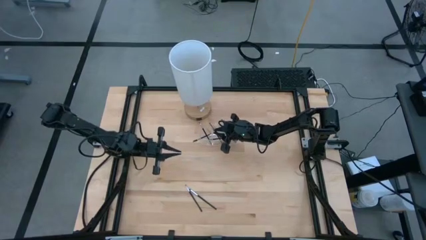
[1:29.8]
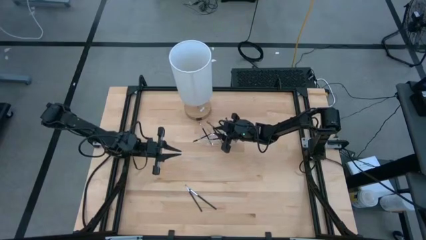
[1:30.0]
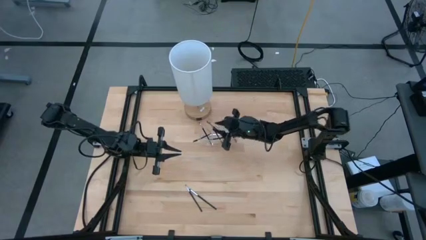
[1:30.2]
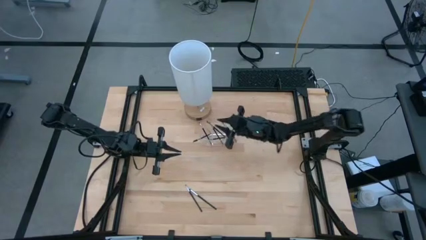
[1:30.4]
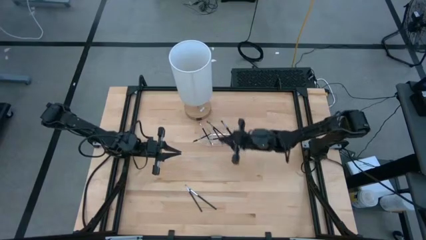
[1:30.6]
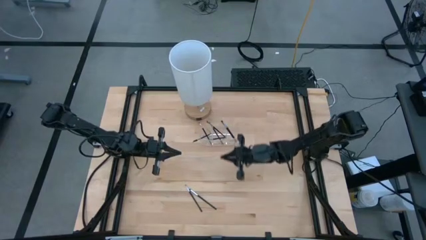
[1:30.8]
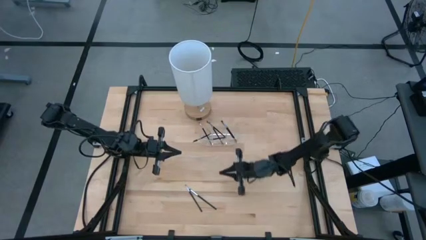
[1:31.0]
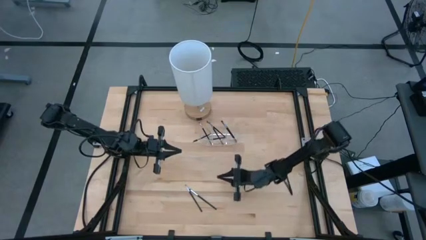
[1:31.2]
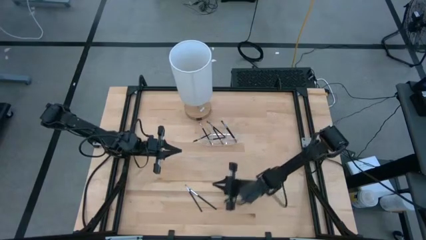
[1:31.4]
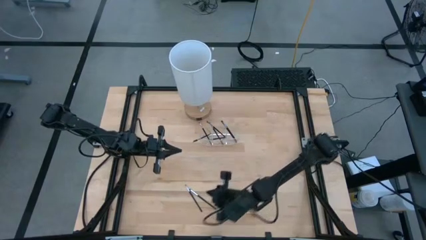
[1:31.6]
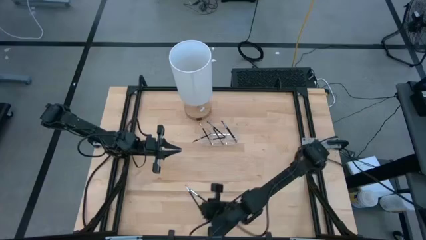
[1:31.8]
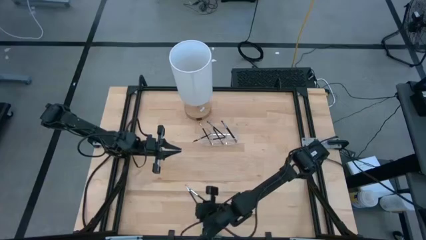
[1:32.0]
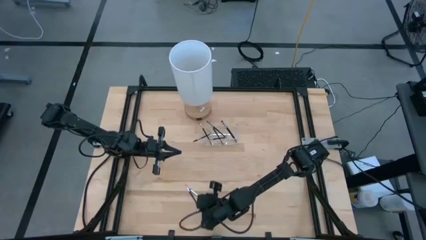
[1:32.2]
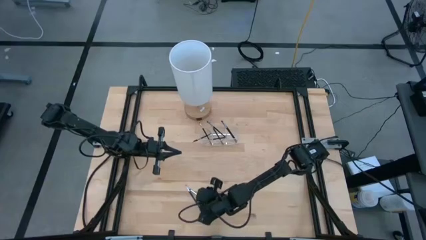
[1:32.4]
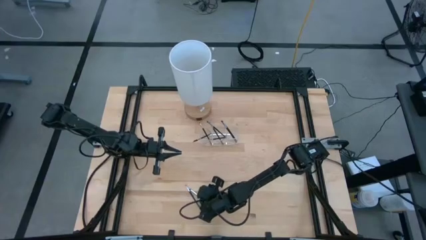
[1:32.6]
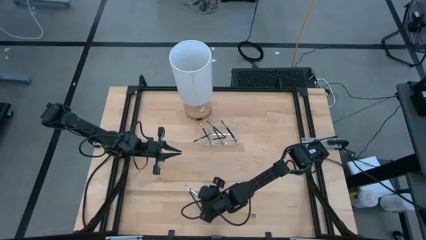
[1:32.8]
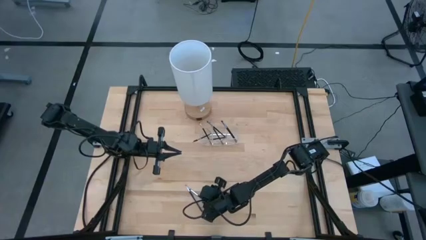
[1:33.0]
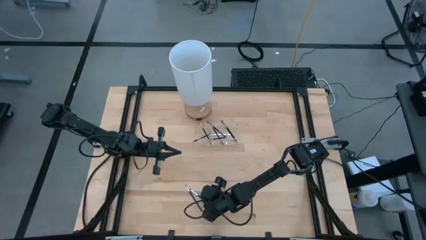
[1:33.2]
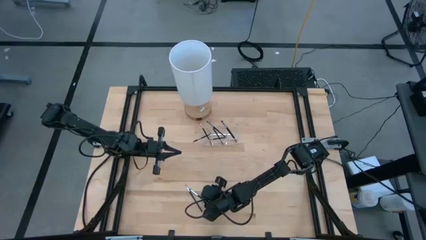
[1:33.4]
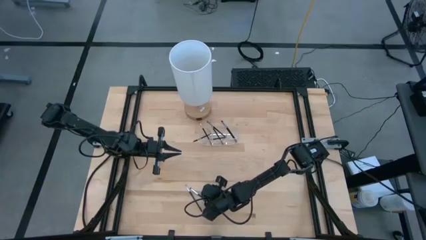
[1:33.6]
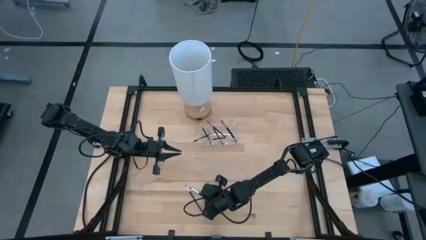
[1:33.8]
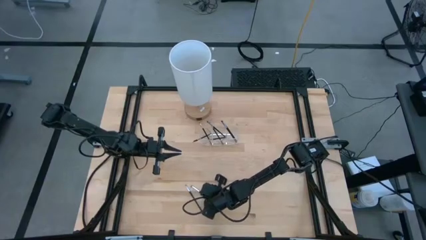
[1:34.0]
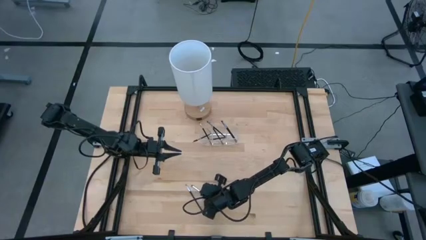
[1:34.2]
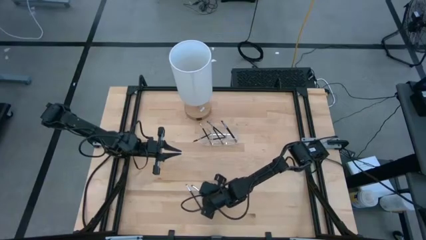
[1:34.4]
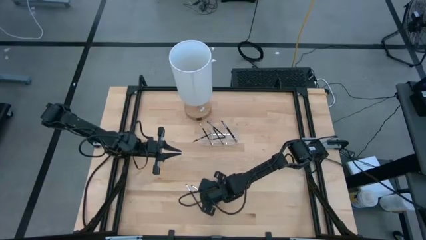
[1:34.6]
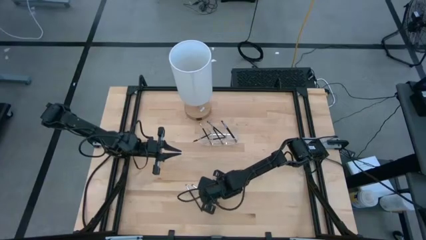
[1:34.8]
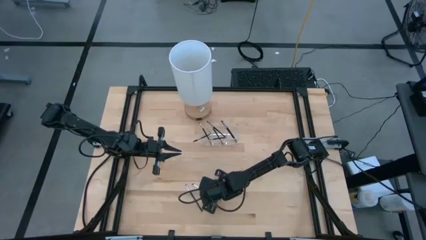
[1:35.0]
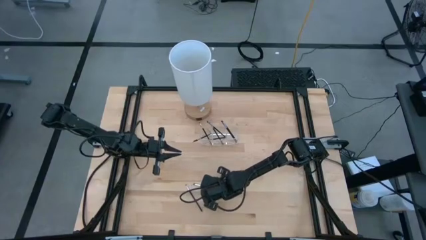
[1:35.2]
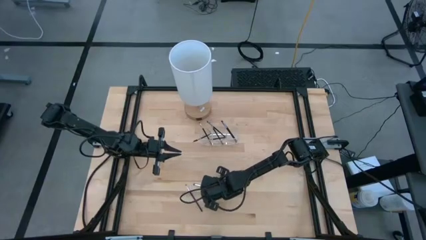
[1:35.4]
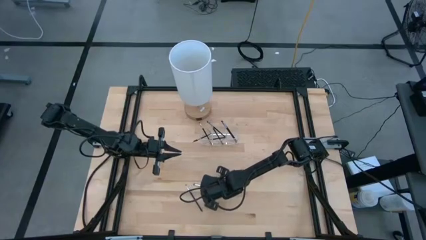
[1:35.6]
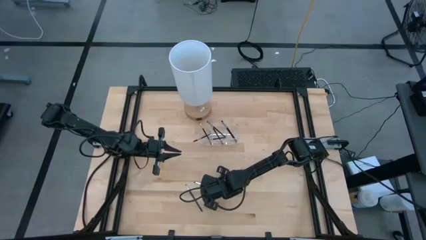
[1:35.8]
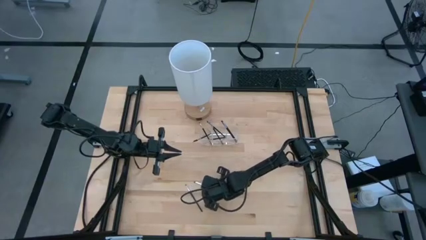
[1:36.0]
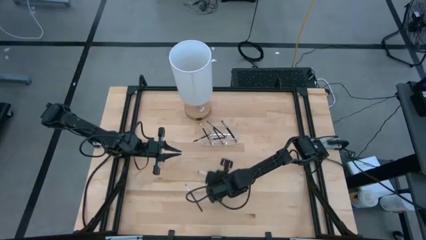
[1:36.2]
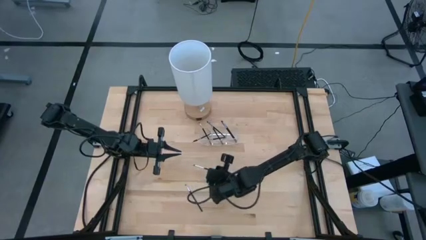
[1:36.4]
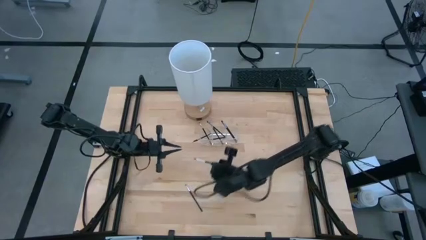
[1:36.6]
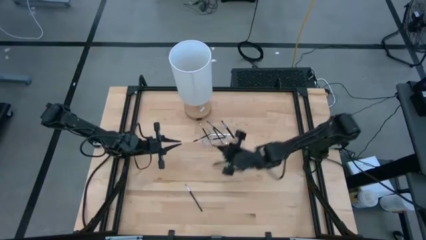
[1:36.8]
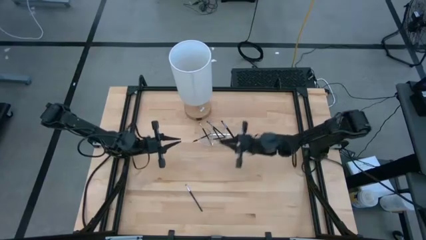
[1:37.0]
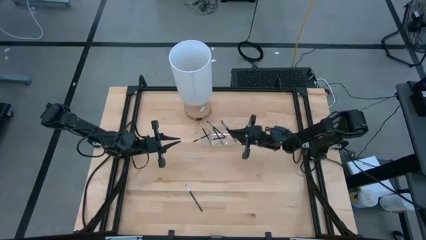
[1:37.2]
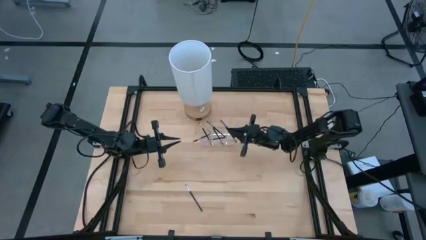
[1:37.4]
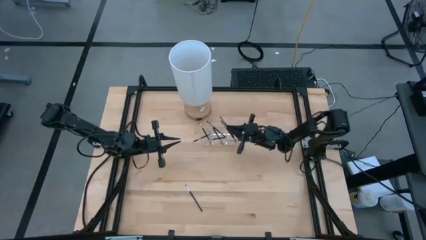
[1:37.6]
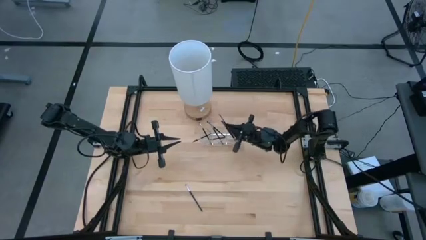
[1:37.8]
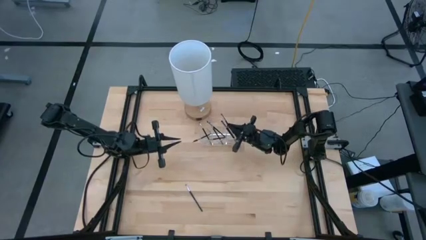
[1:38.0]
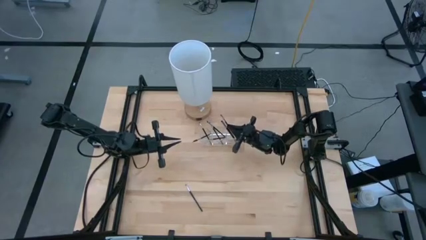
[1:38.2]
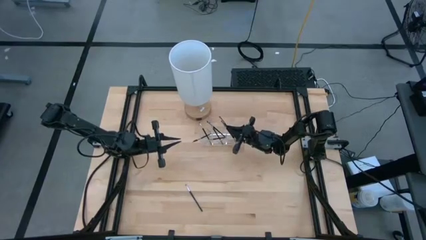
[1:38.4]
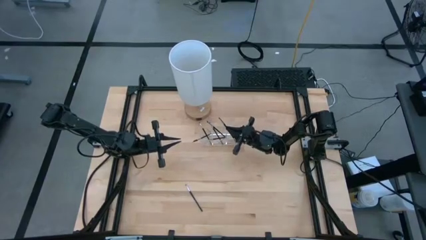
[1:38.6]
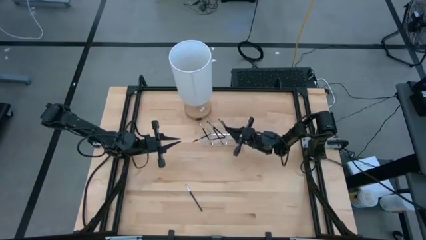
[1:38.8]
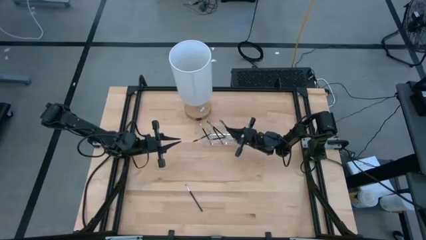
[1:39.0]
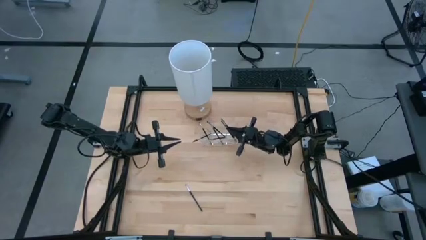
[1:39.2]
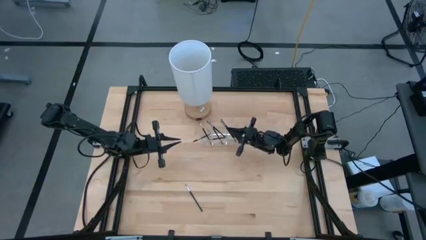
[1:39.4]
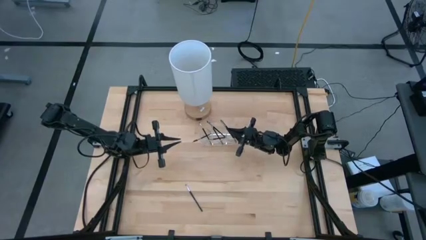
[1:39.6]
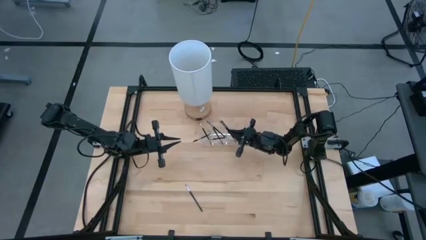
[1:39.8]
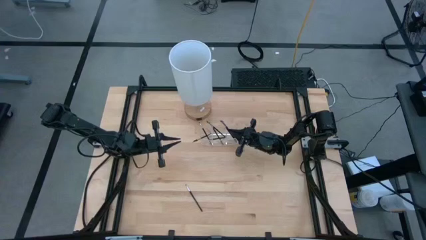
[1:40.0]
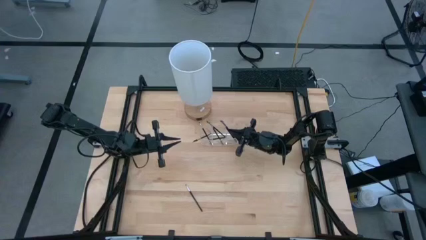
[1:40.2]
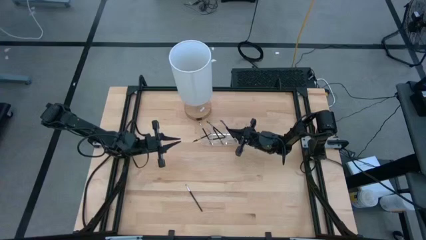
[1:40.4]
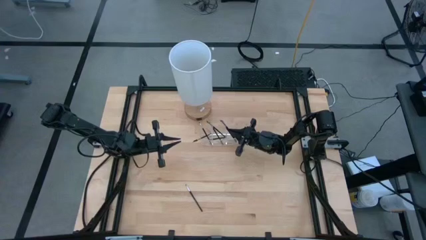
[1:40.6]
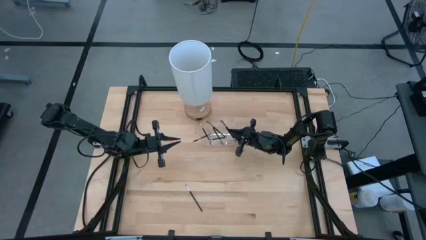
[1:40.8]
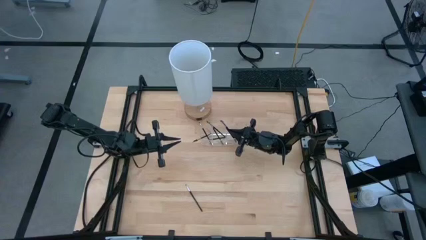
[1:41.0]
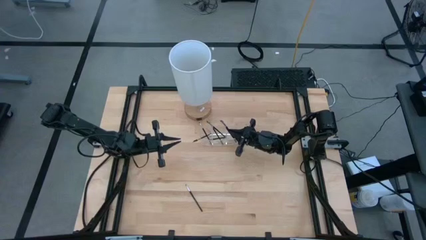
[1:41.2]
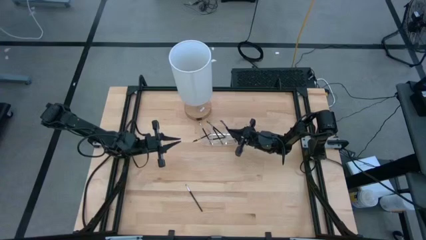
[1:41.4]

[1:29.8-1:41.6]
Task: Pick & Place Makeup Supplies
Put the makeup brush into the transparent organizer
